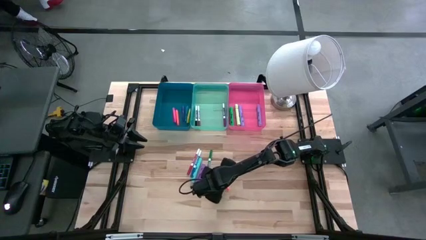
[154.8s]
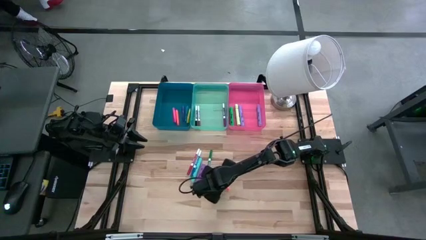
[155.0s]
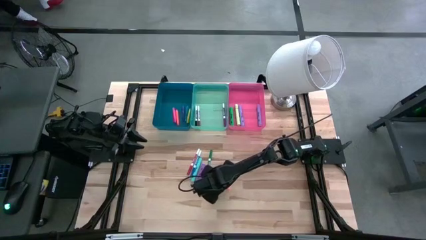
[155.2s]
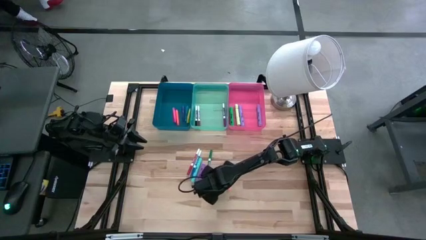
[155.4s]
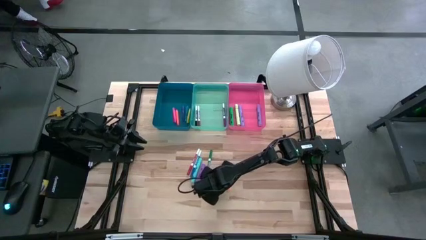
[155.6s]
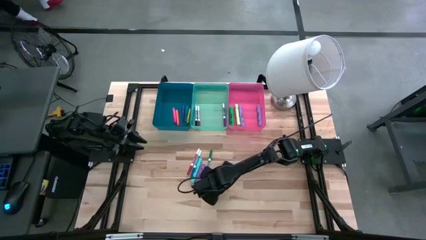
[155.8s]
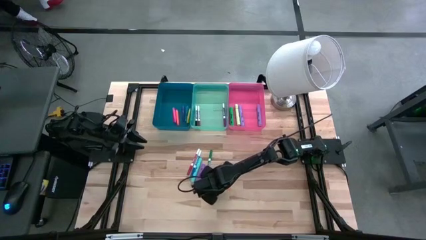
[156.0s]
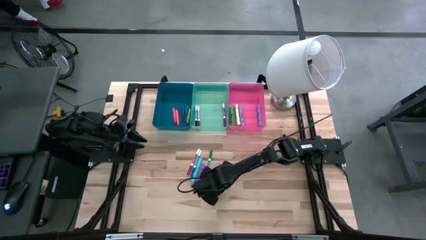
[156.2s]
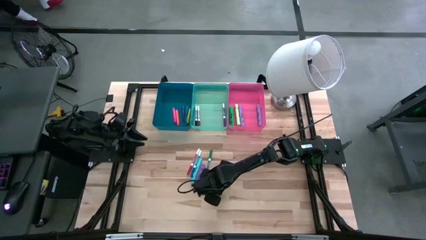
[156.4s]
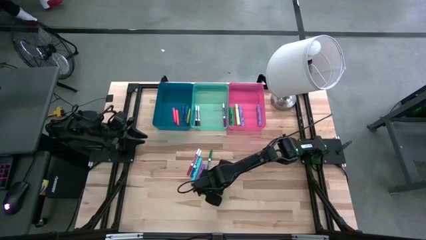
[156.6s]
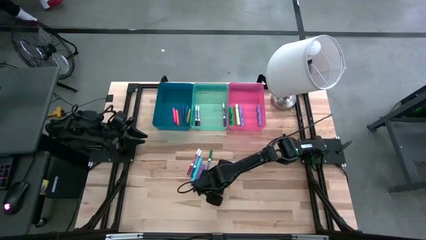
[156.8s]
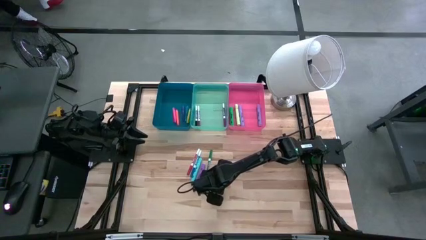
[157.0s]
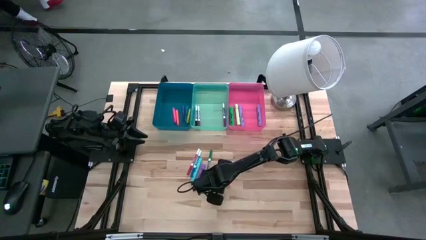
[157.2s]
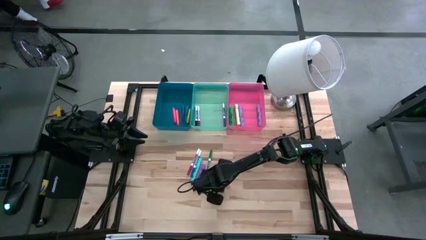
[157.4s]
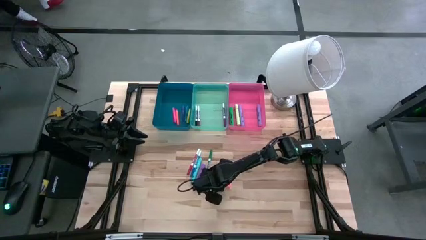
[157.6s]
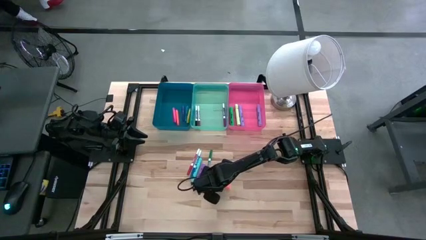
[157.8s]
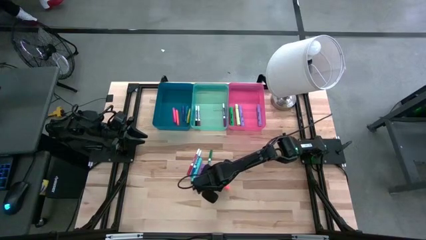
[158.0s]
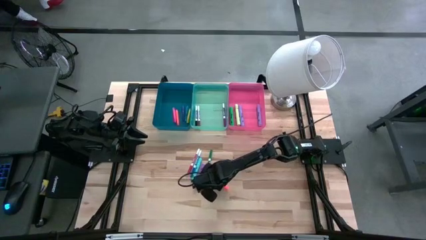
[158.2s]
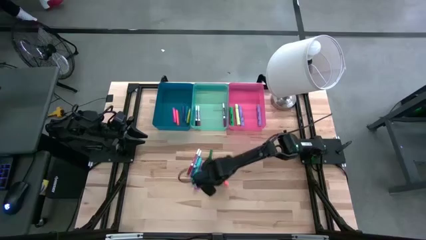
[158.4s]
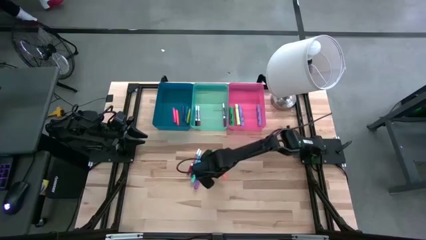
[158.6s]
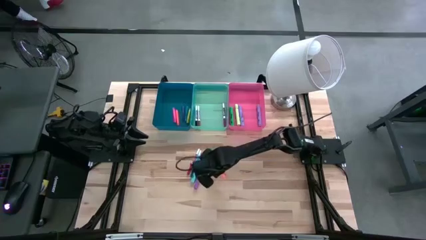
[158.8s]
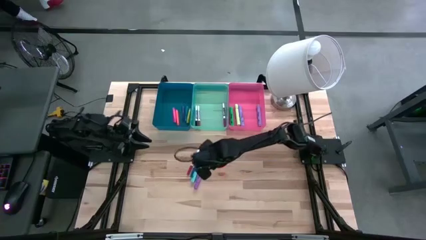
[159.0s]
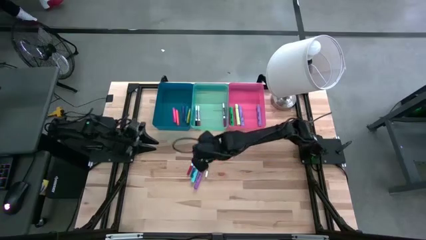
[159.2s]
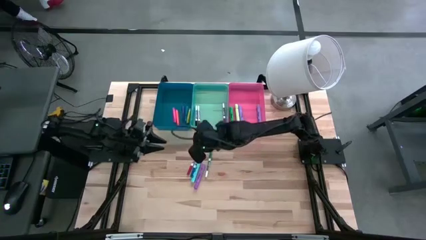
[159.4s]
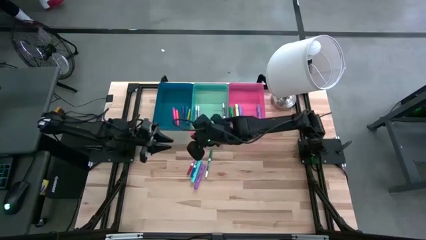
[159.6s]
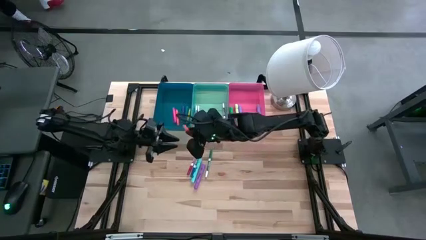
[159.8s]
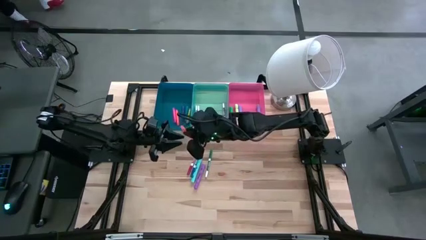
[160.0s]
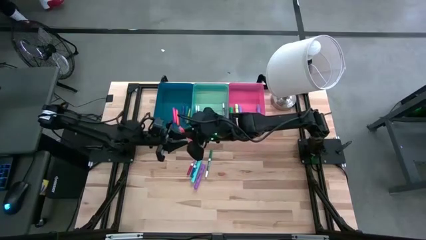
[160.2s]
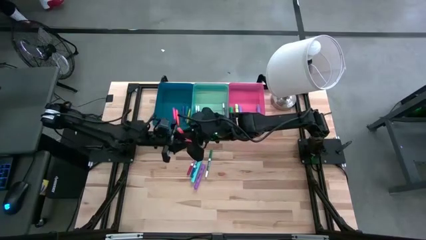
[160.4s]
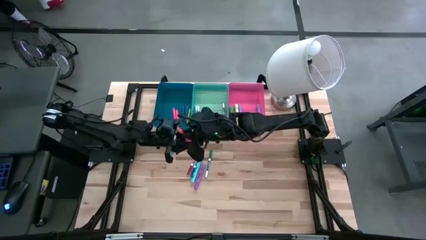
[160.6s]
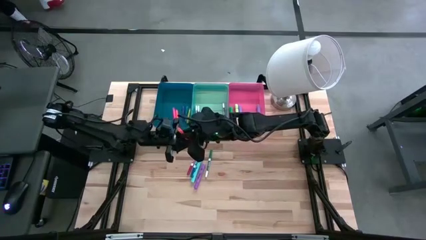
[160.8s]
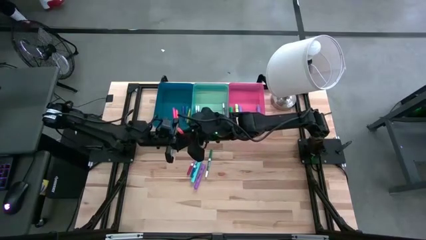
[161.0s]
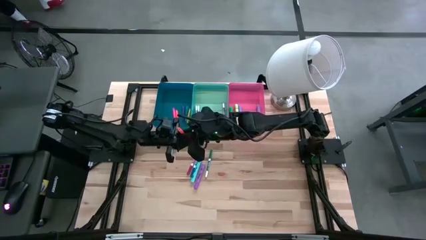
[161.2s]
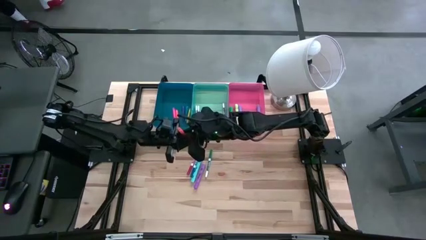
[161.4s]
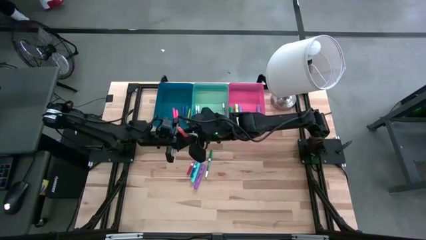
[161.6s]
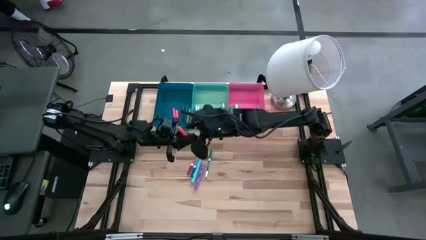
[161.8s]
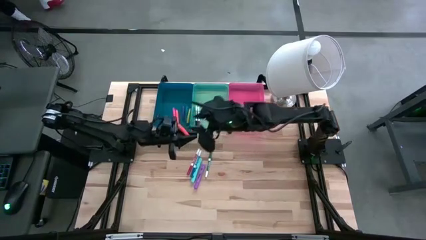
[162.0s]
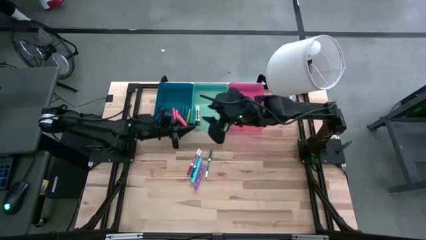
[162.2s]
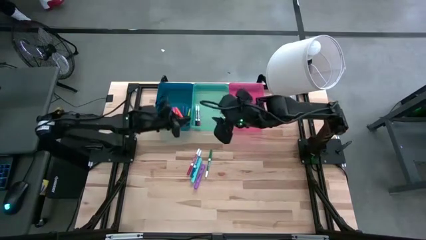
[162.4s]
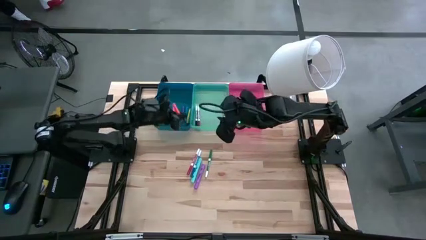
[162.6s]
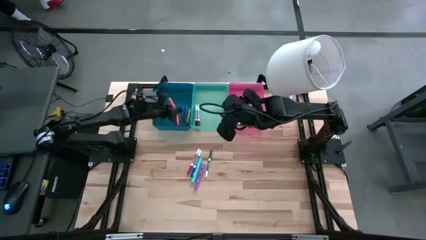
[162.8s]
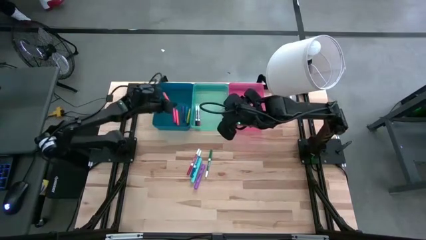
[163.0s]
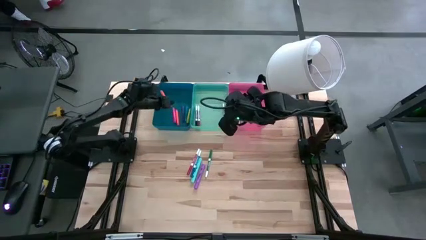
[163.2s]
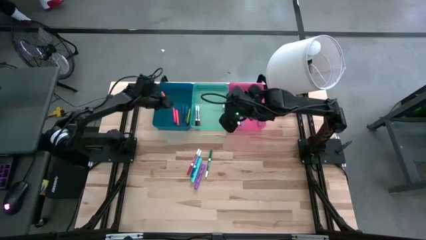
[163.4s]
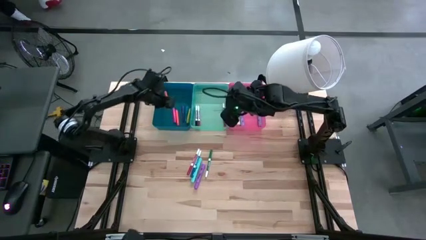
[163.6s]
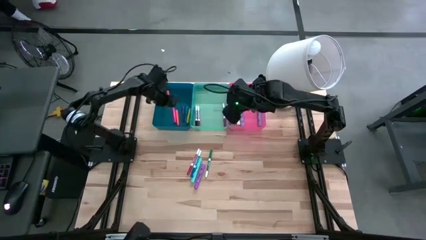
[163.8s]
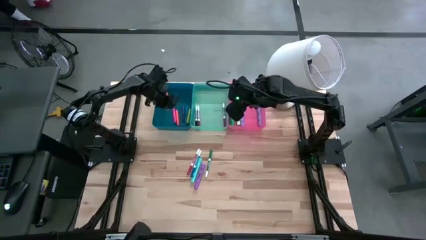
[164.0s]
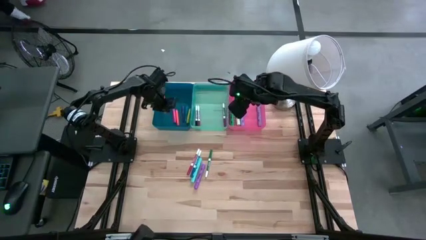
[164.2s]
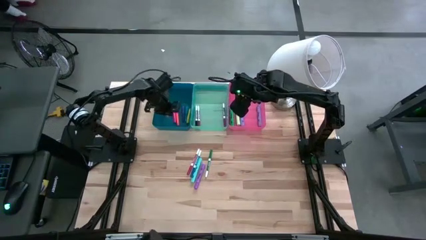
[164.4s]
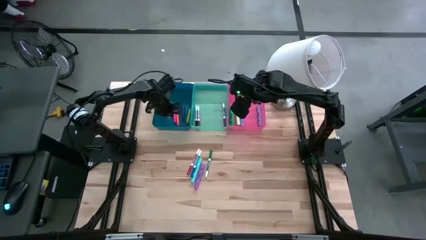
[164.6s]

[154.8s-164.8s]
Task: Pick & Place Markers
Put the orange pen into the blue bin

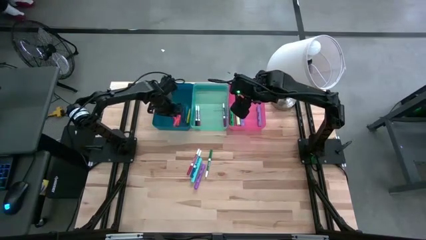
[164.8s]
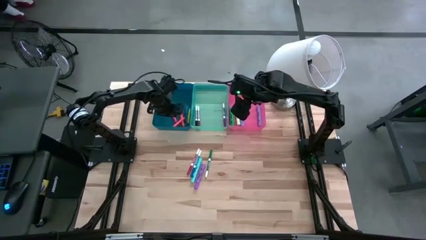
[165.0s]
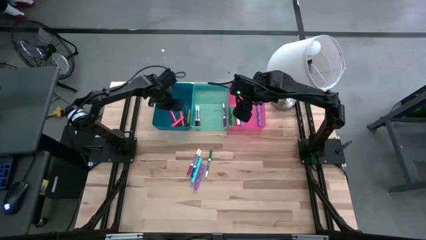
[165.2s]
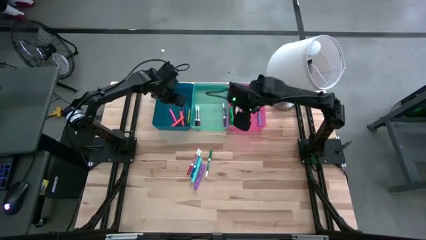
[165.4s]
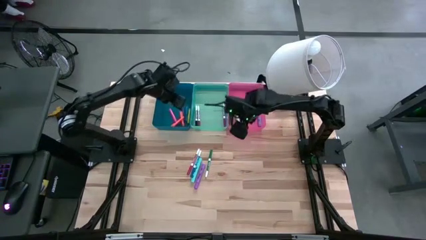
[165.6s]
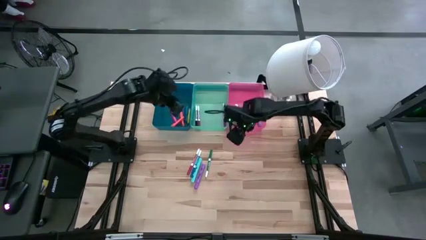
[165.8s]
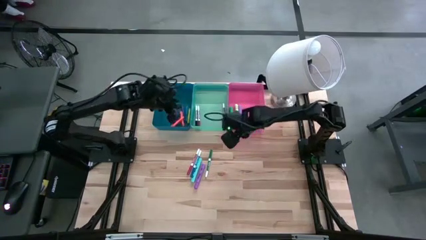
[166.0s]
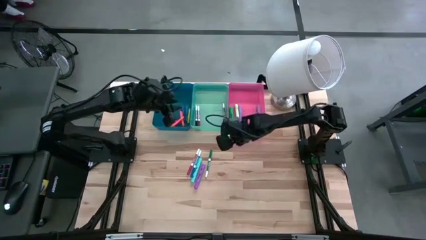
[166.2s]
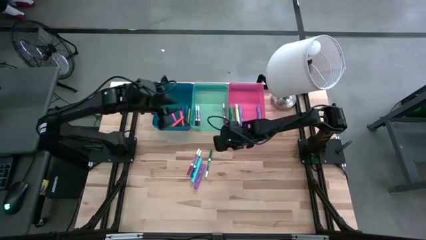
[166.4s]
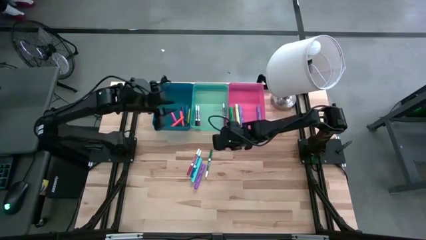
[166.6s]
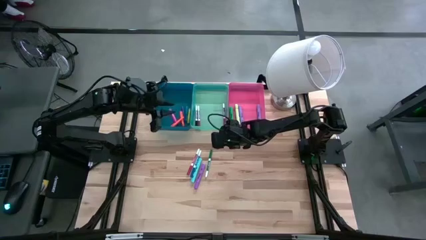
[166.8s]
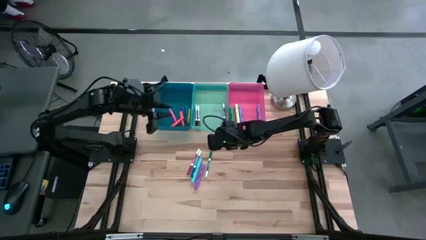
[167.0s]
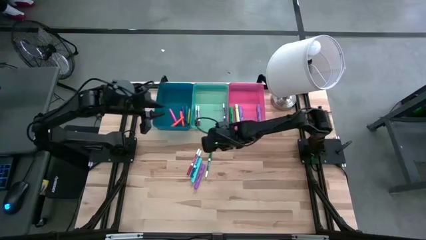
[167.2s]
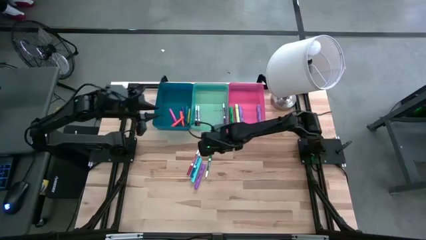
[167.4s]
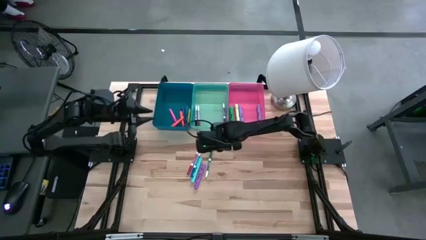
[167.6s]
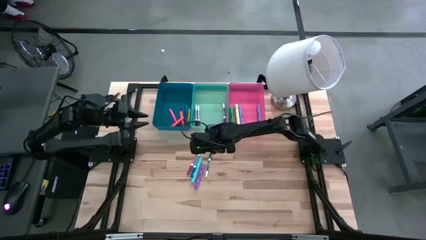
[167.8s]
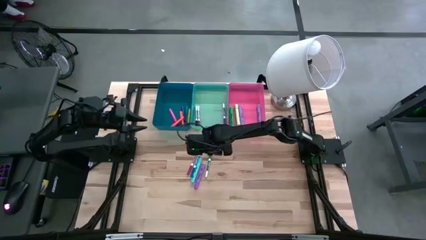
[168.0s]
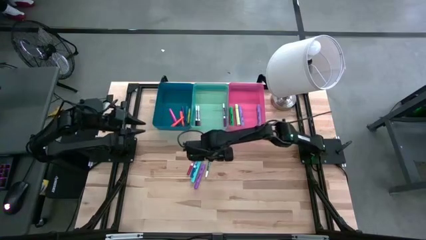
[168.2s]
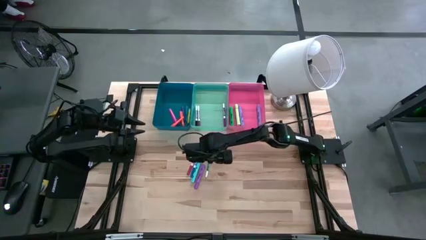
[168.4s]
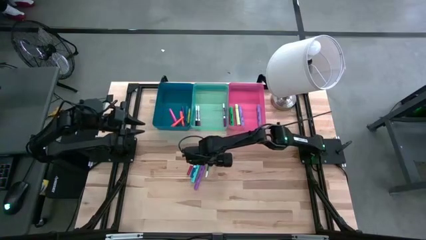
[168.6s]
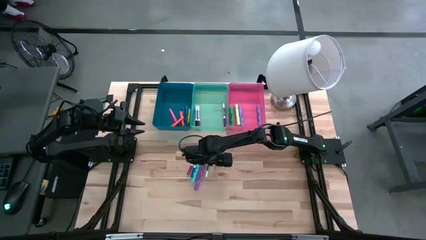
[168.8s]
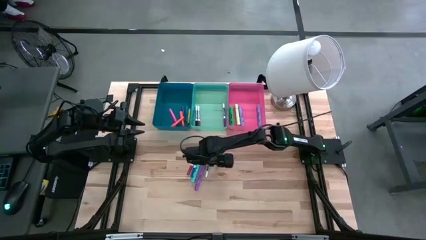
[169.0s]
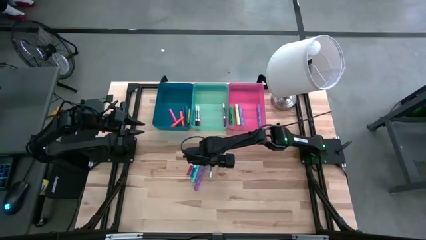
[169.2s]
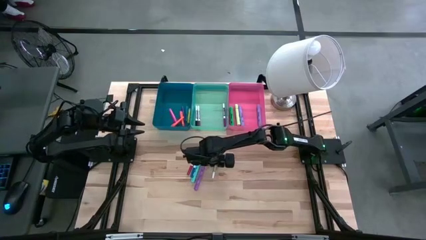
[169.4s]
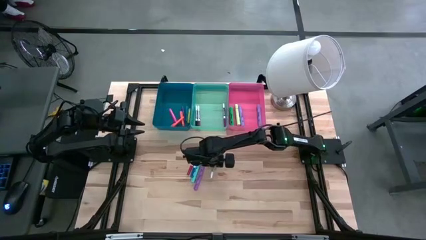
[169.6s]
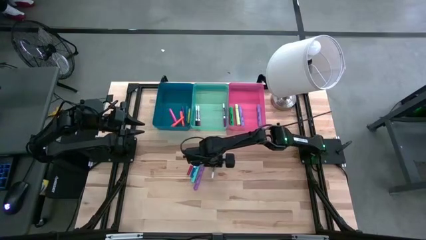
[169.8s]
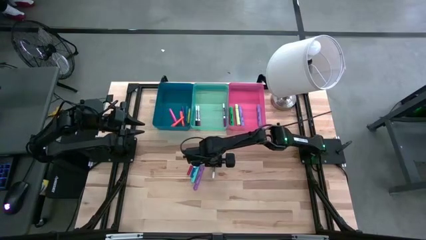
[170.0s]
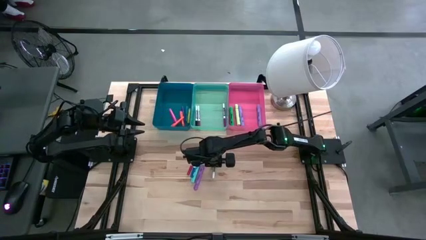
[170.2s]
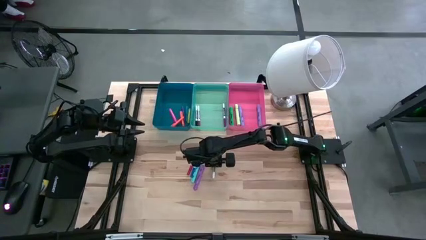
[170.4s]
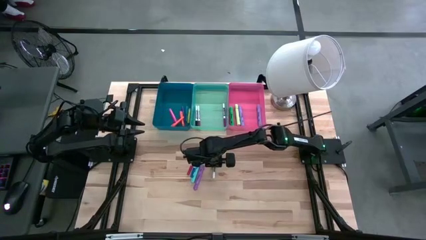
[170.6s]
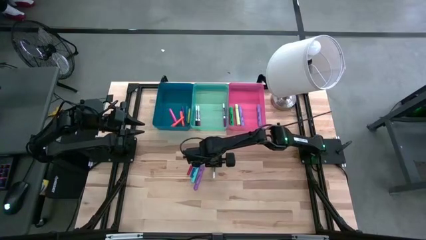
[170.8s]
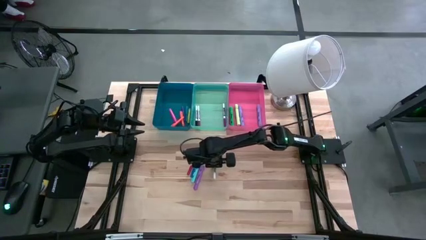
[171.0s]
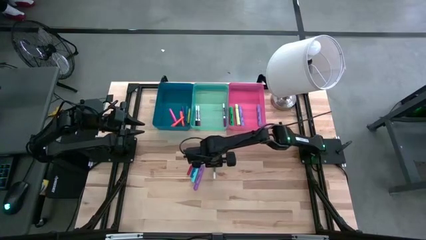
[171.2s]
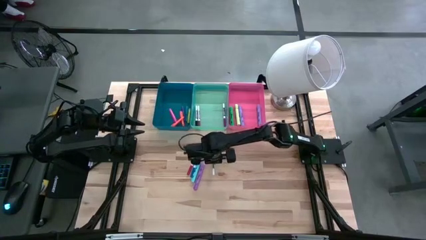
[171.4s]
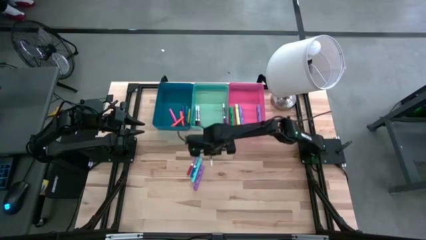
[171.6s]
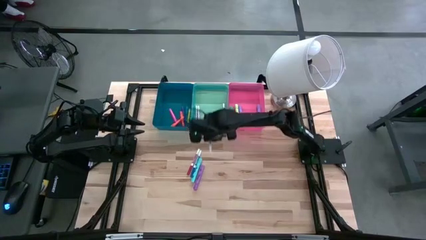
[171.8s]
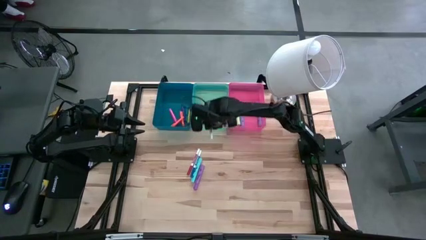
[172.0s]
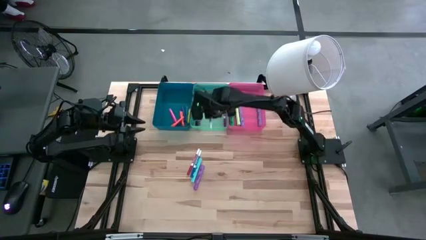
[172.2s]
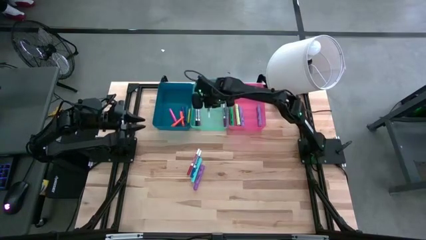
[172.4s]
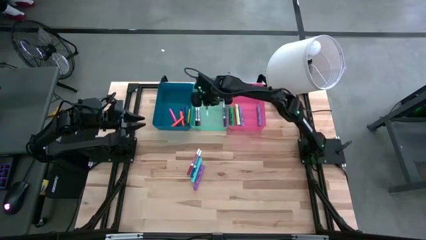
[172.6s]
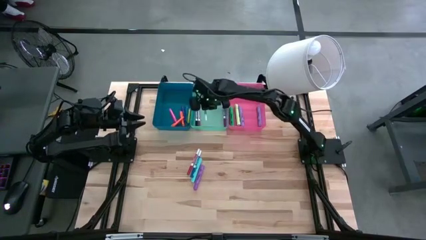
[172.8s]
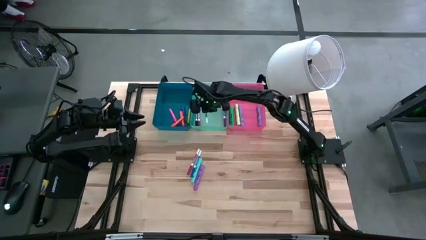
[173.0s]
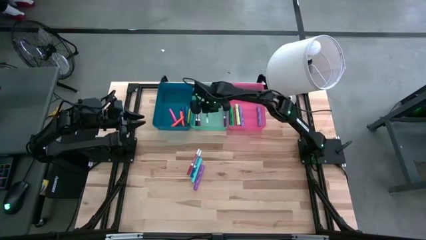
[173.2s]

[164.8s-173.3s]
Put the green marker pen into the green bin
